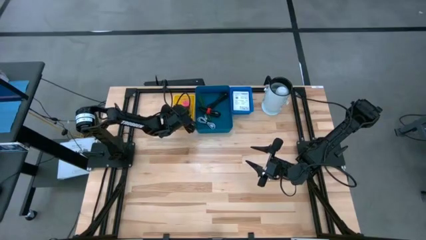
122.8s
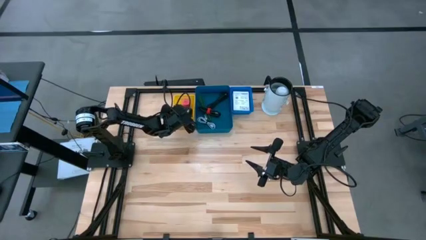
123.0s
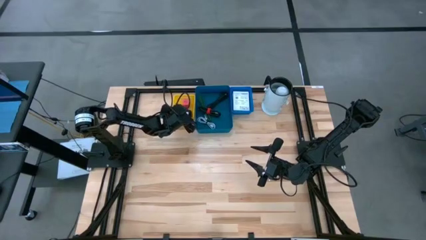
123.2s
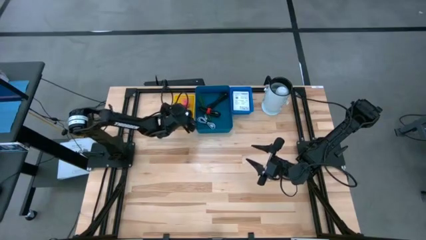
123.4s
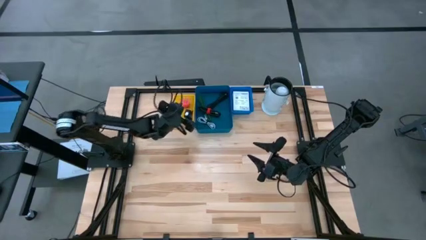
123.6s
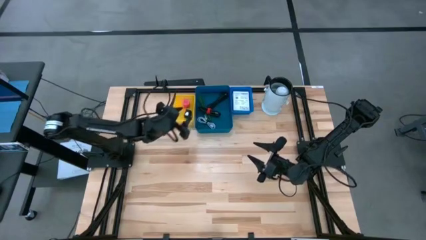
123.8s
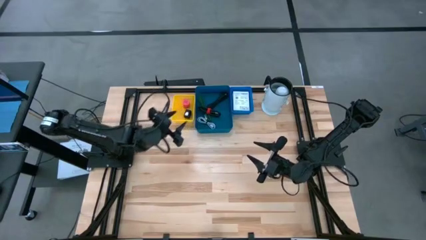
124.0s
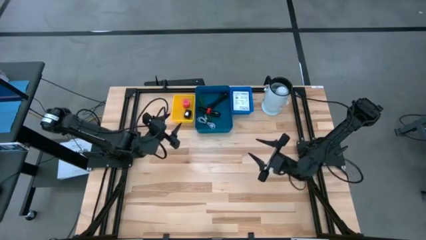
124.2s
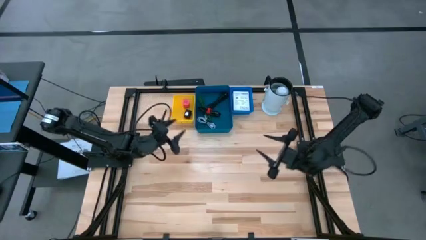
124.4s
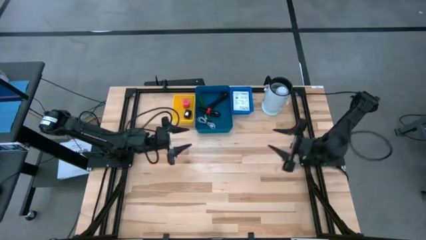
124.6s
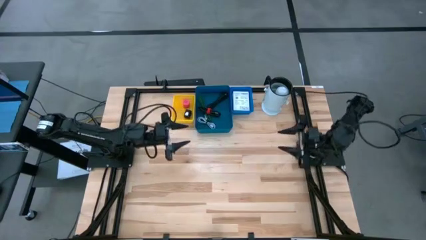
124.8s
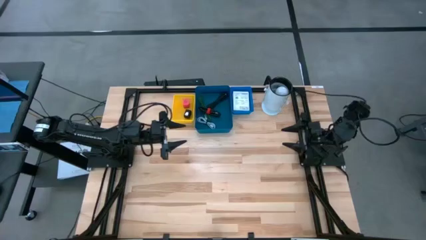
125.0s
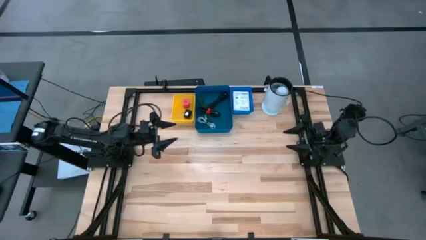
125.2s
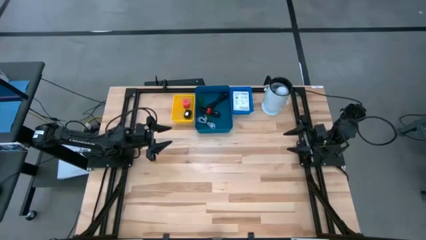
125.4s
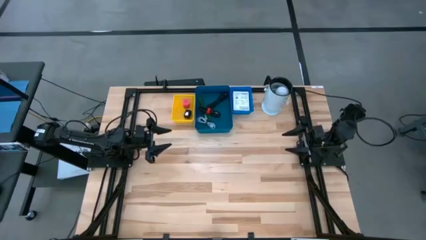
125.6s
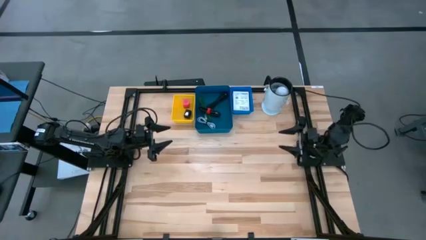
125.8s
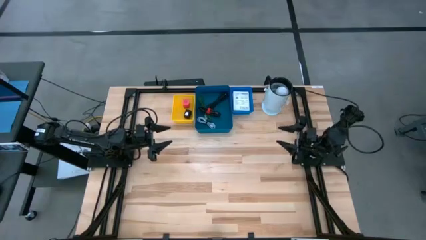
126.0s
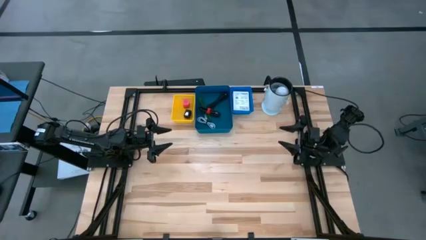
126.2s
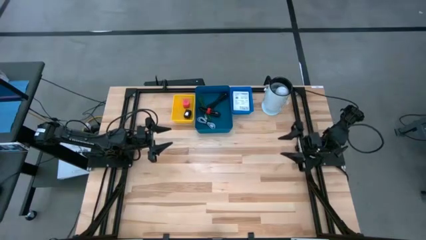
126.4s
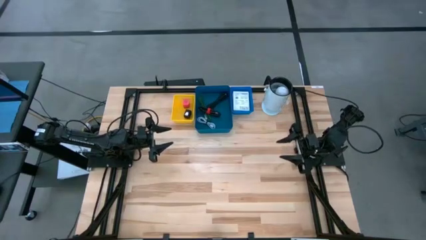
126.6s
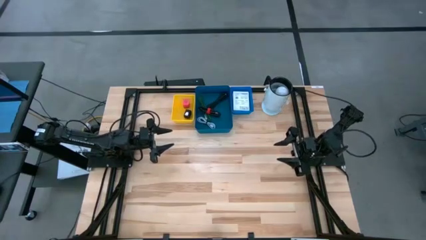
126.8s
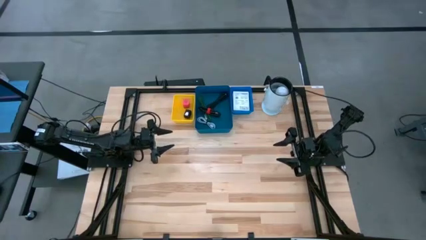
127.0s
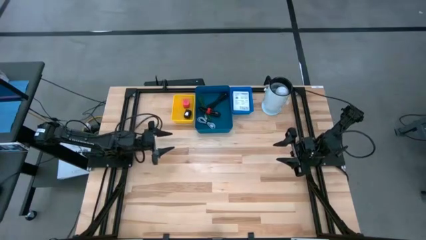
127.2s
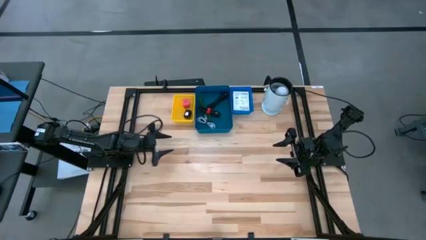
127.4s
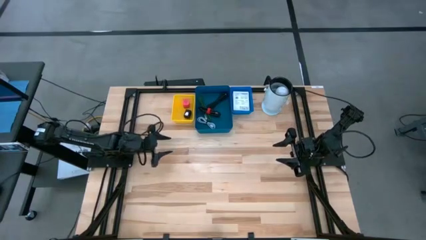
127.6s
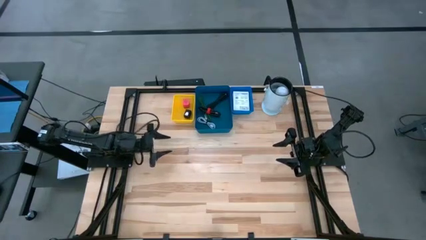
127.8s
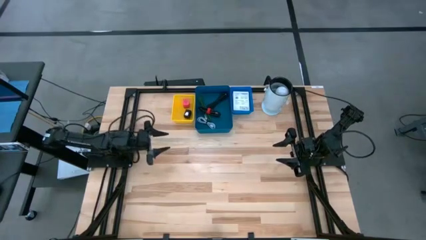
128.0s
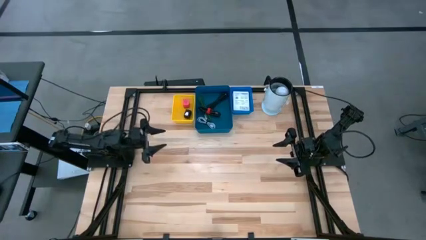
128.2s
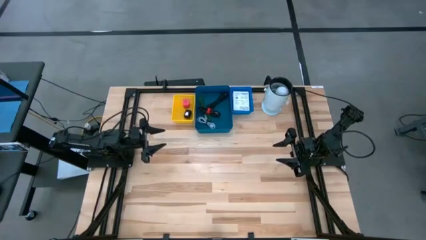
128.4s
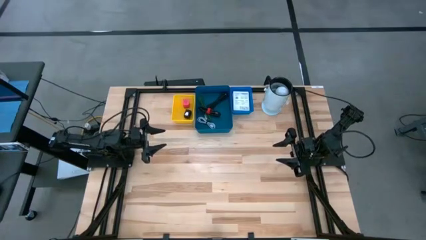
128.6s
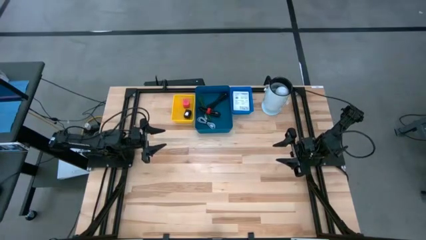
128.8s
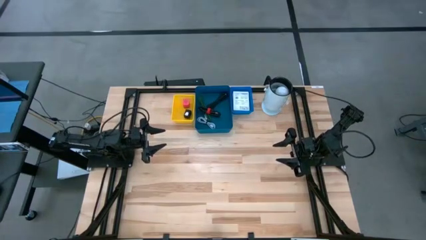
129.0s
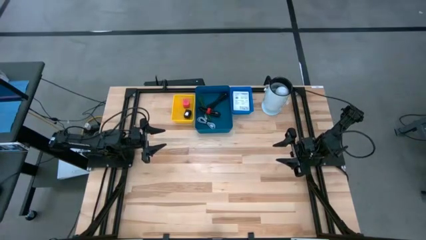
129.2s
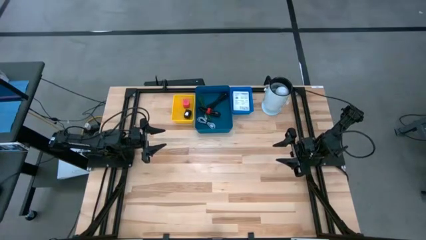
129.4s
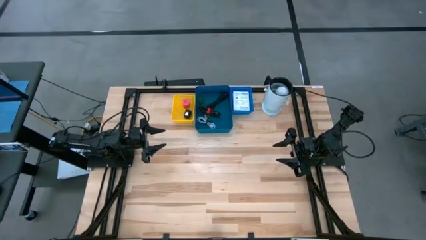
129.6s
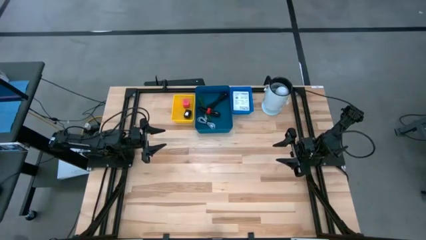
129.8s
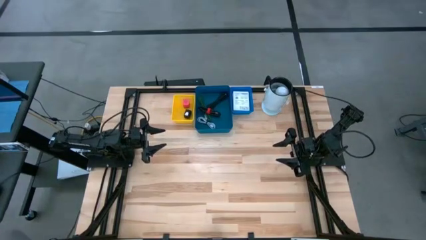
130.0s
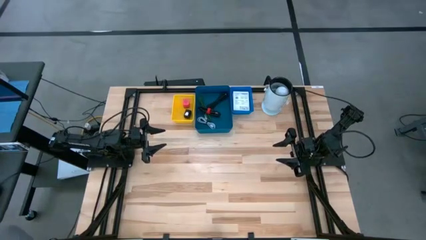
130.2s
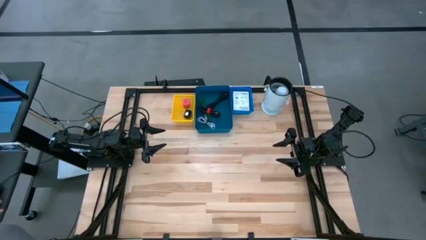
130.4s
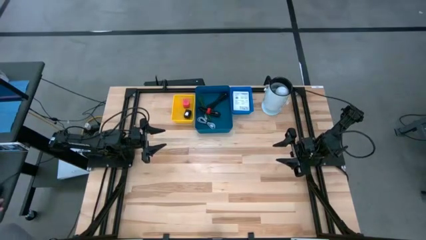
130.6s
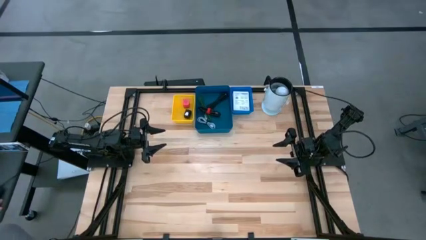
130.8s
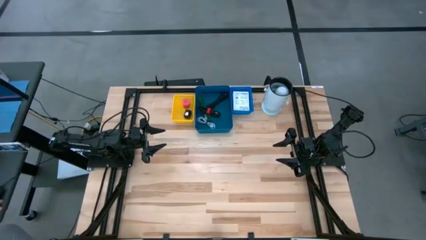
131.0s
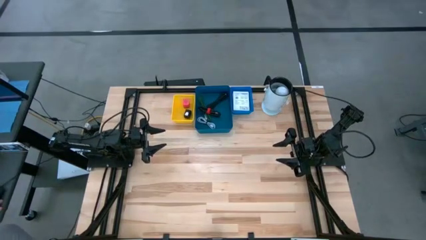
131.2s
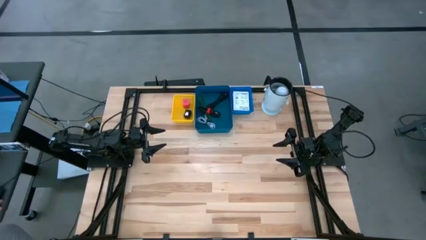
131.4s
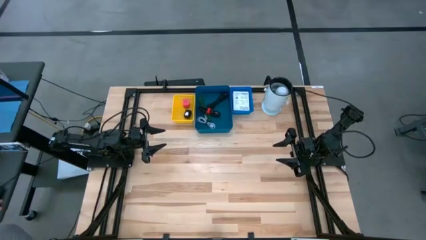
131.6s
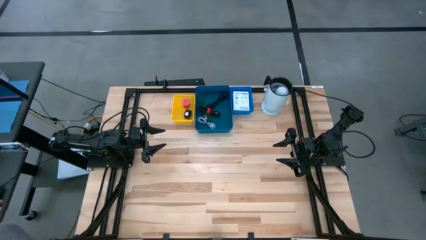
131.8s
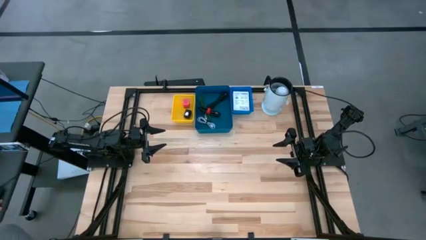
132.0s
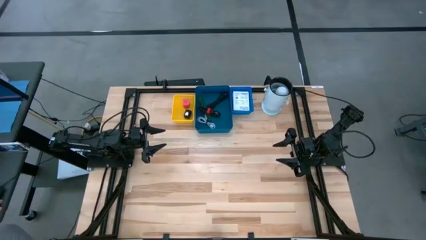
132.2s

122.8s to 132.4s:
Task: Pick and place items into bin
Return to Home Position

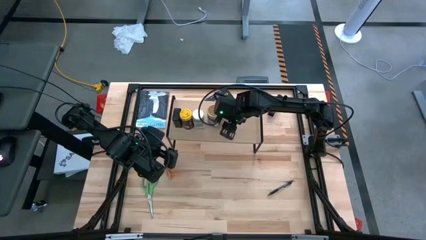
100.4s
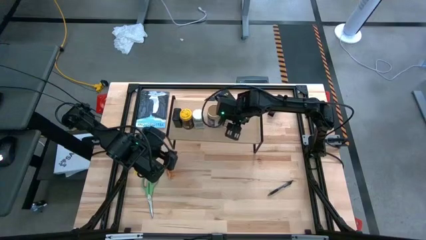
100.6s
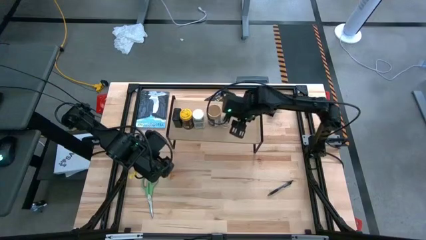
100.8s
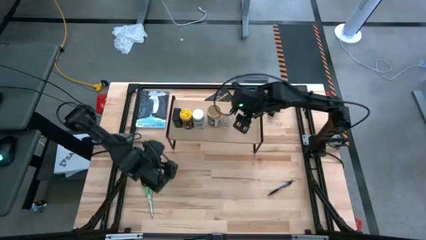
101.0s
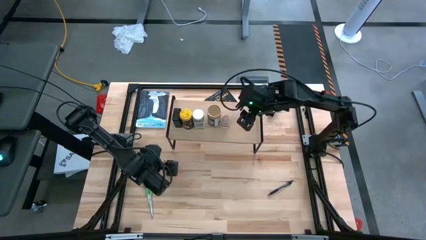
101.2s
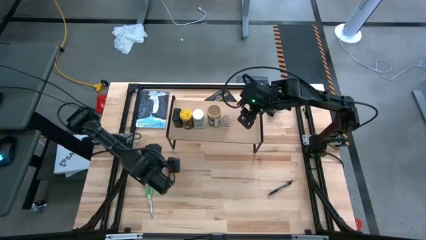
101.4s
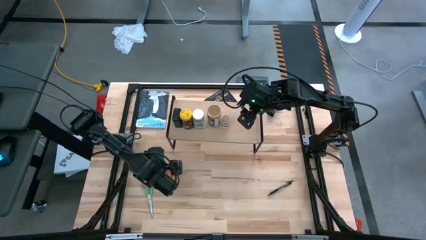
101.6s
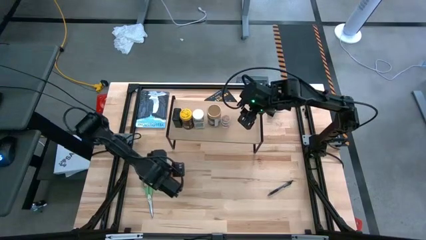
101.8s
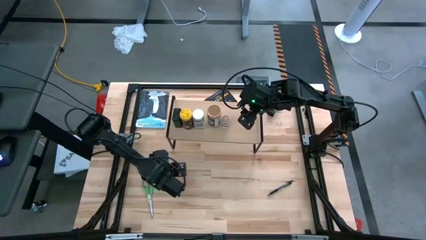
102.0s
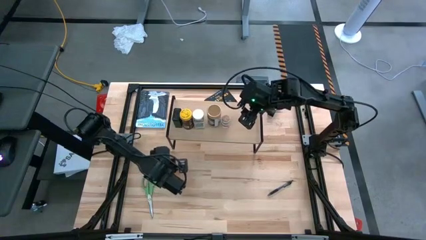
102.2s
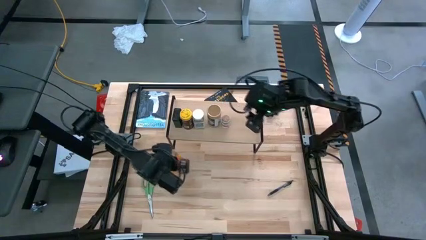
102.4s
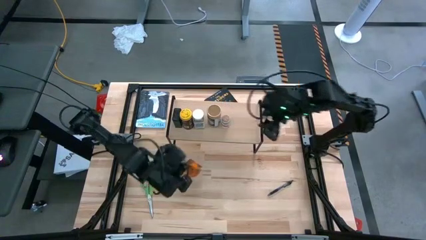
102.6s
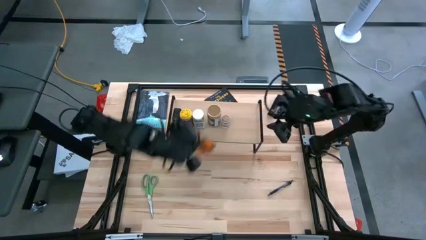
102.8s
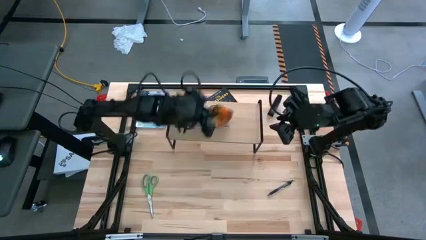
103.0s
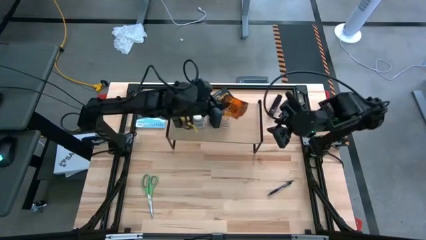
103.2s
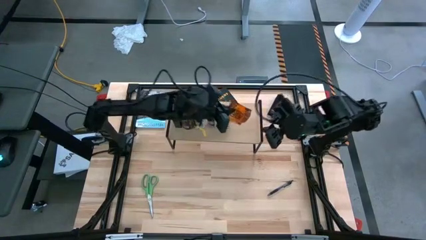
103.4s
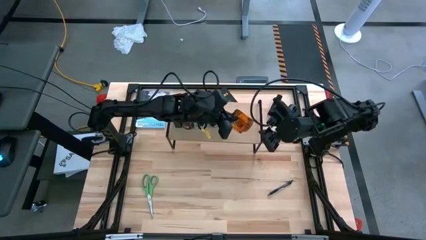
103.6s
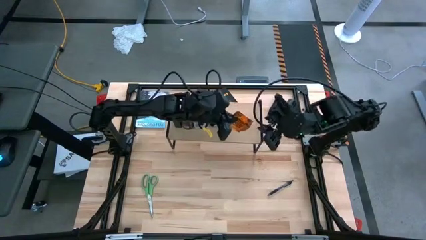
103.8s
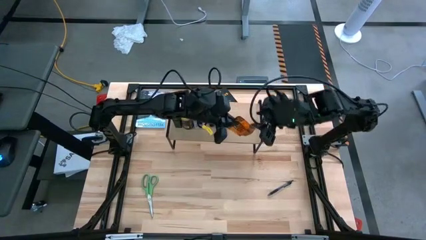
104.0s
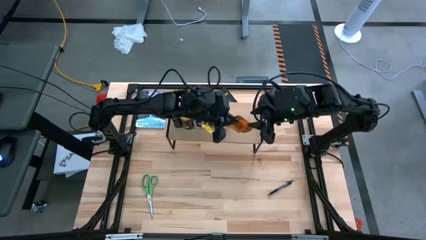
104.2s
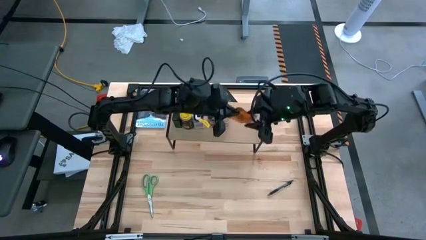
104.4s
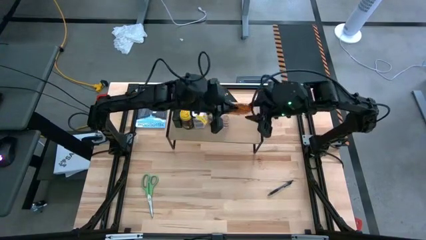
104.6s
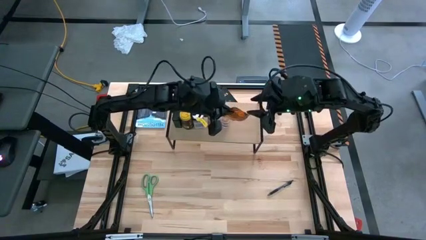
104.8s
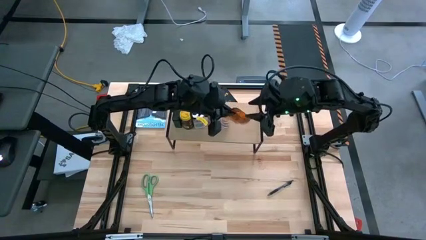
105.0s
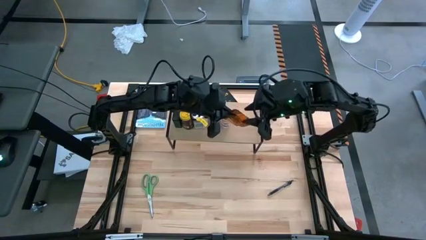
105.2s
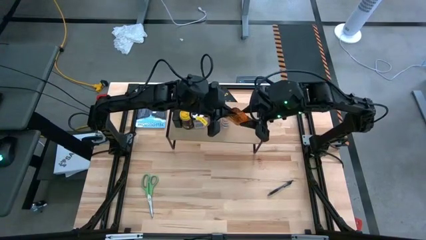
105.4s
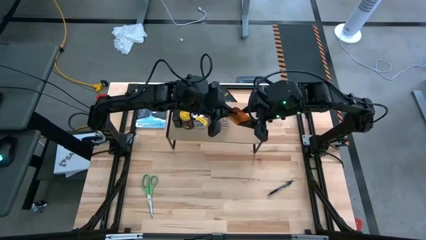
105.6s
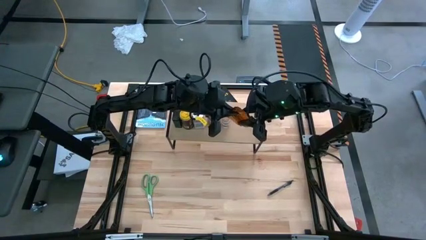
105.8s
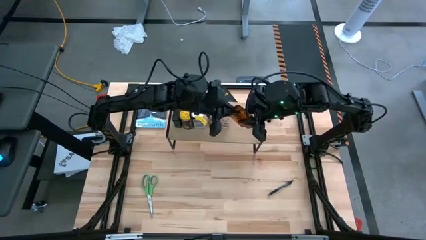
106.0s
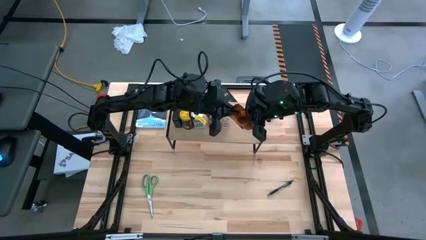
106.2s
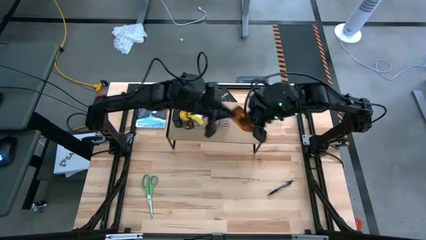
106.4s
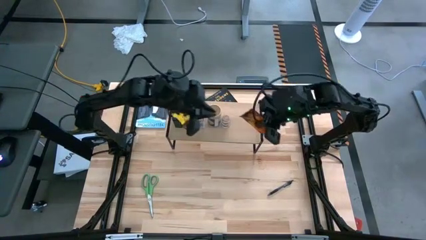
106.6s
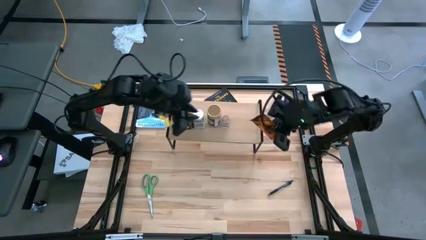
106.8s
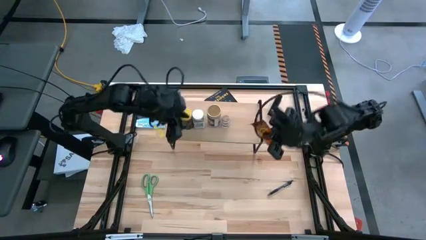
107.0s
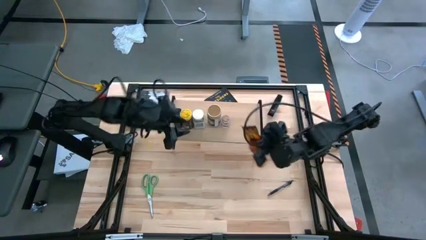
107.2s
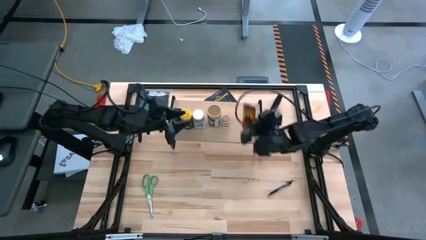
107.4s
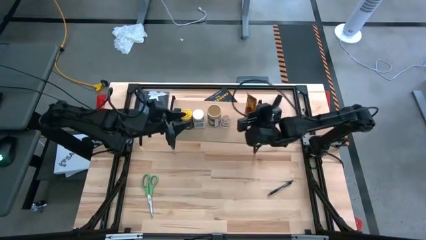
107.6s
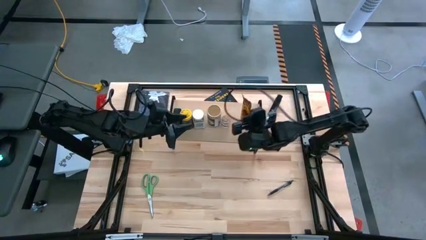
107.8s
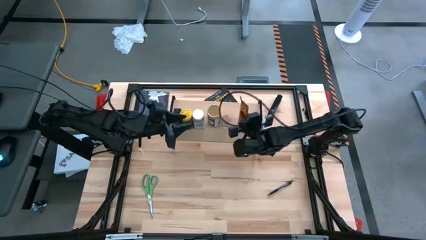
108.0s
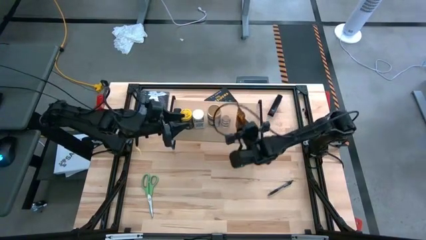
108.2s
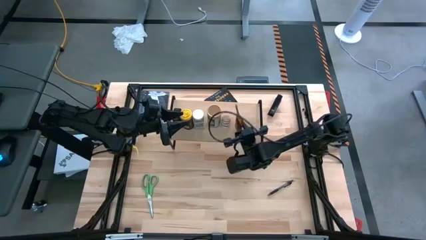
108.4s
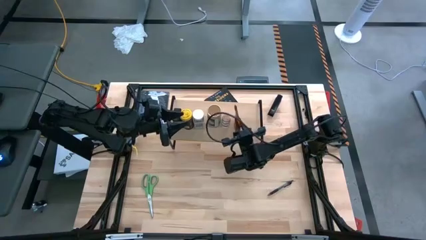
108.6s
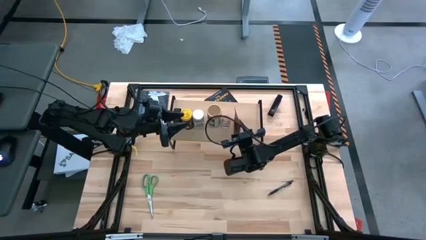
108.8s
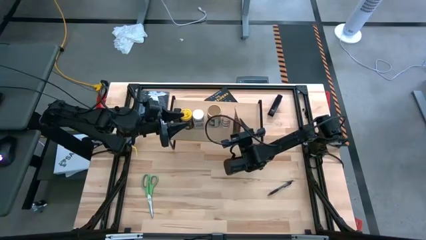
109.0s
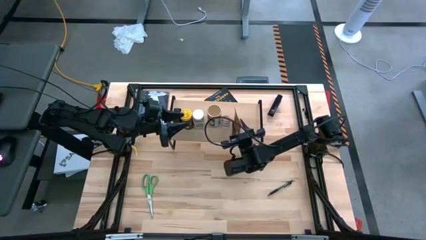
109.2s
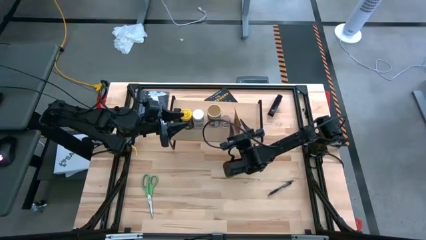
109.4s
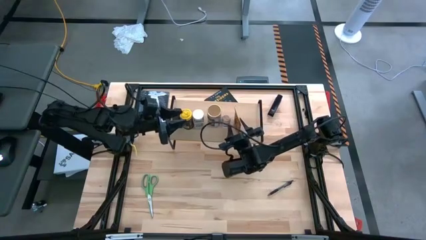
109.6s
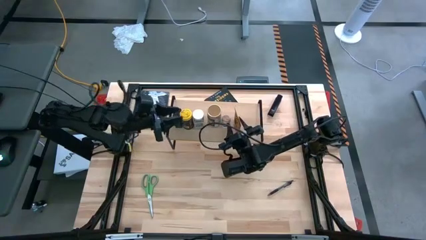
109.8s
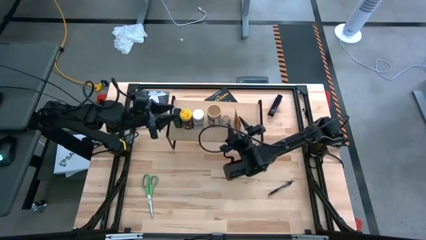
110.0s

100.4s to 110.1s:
Task: Shelf spices
Put the orange seasoning pack on the shelf
